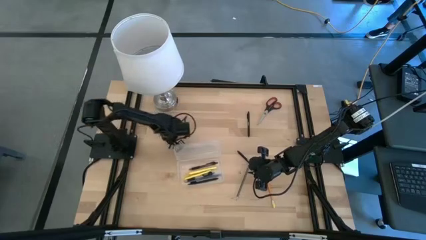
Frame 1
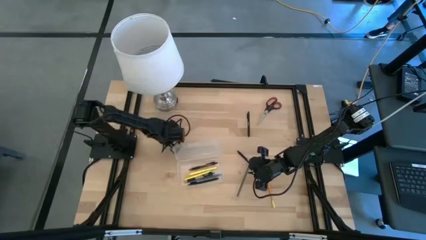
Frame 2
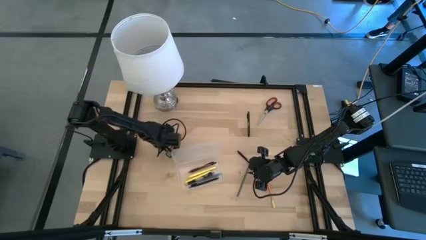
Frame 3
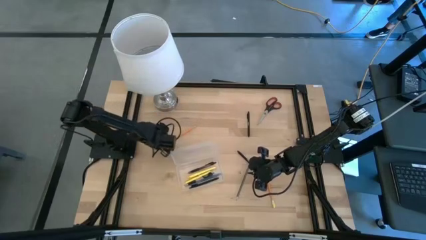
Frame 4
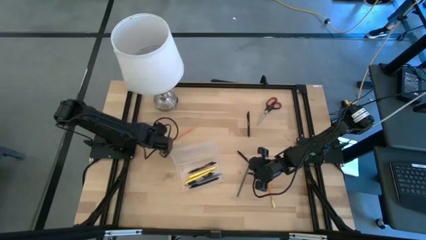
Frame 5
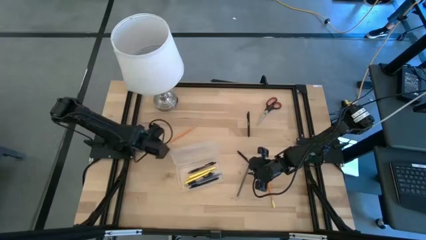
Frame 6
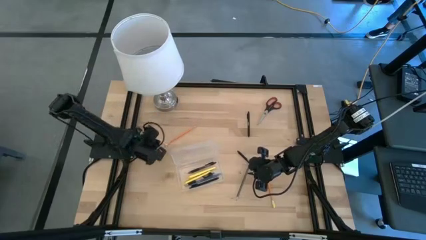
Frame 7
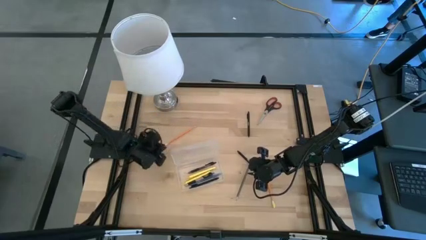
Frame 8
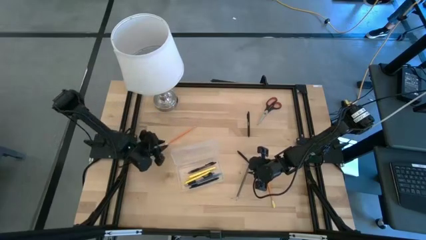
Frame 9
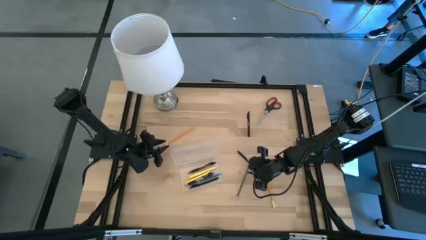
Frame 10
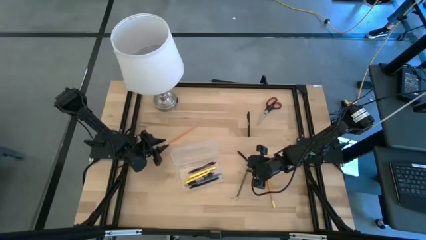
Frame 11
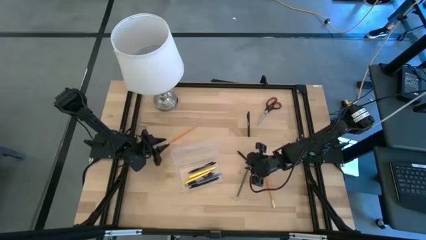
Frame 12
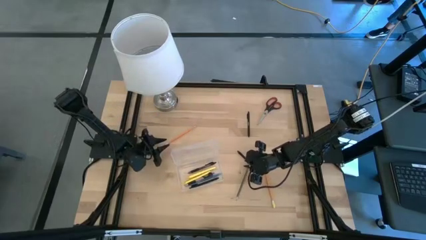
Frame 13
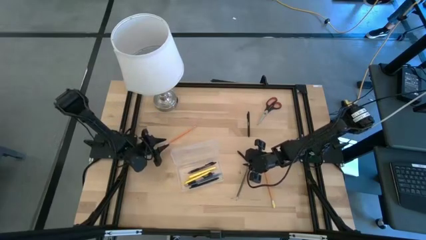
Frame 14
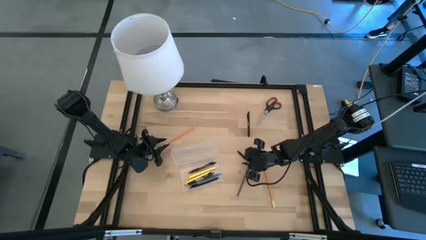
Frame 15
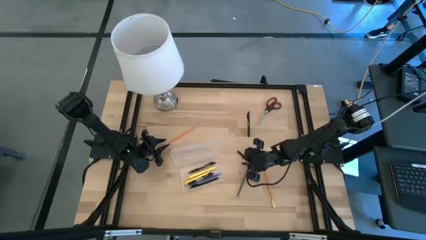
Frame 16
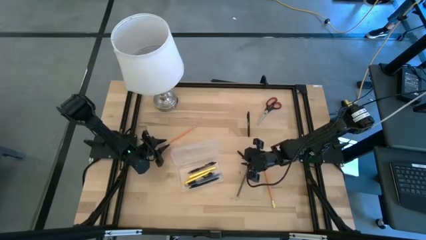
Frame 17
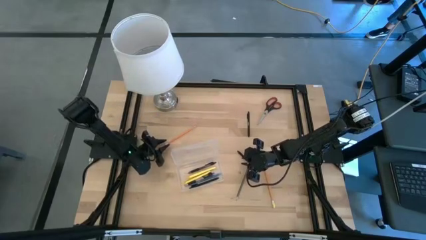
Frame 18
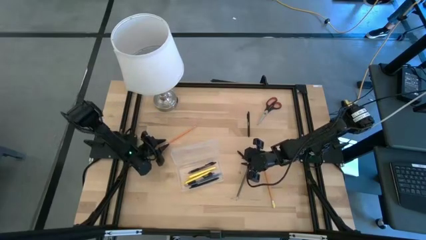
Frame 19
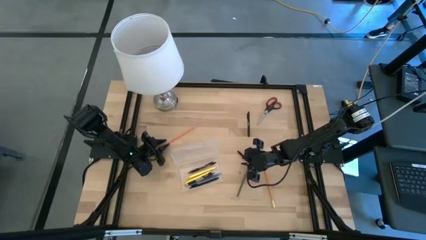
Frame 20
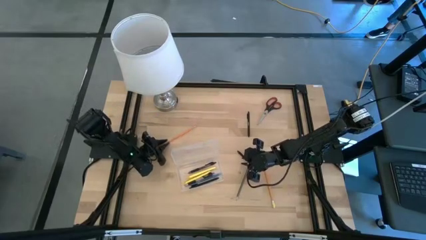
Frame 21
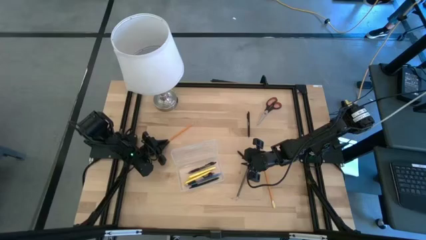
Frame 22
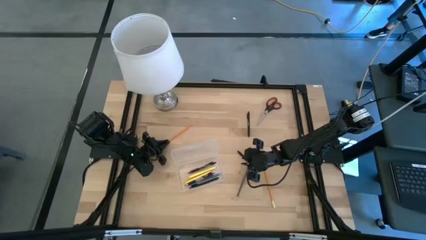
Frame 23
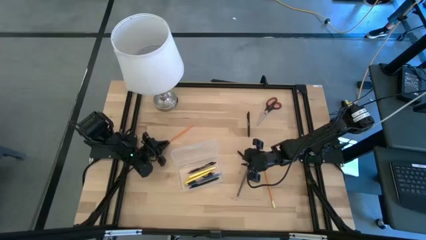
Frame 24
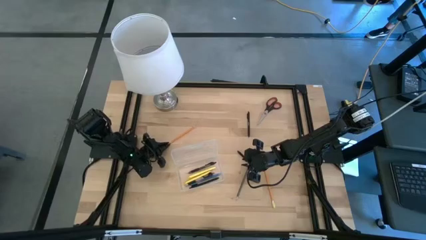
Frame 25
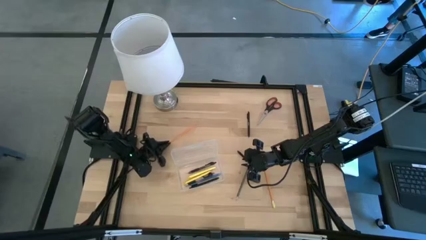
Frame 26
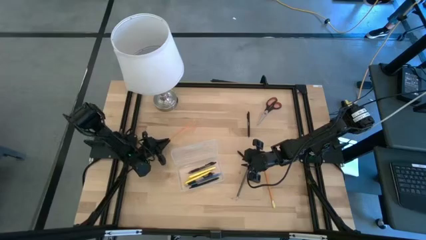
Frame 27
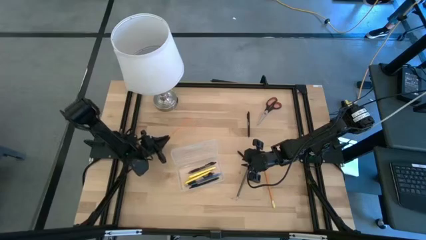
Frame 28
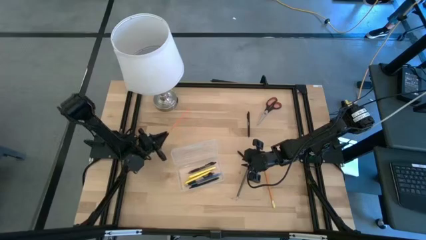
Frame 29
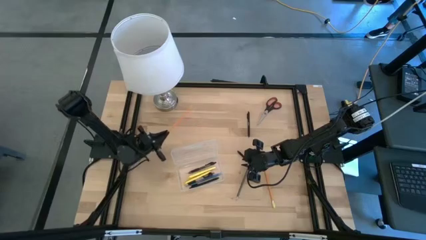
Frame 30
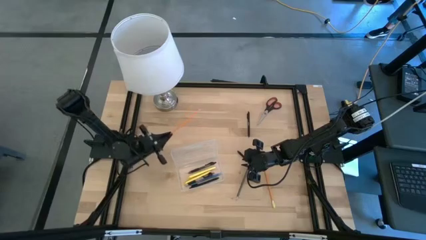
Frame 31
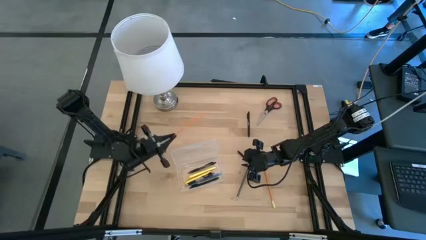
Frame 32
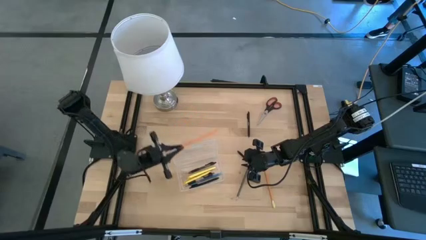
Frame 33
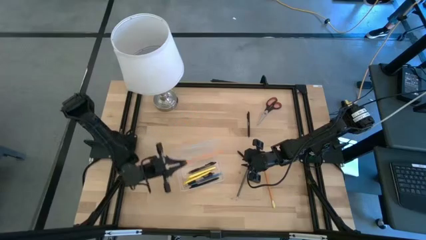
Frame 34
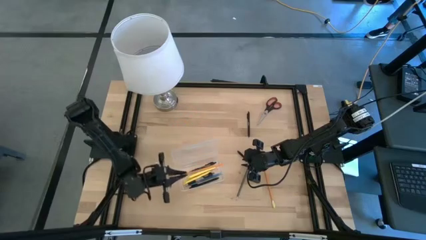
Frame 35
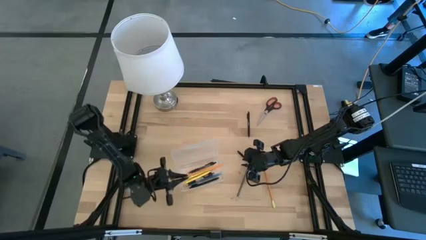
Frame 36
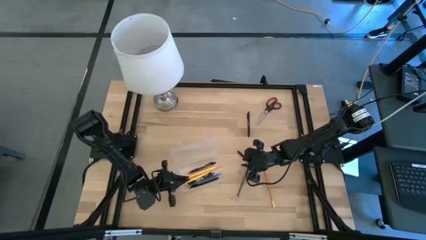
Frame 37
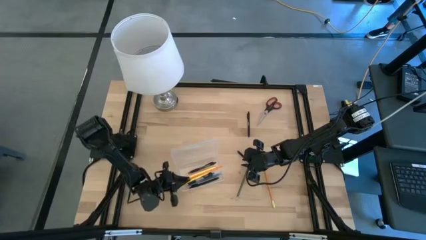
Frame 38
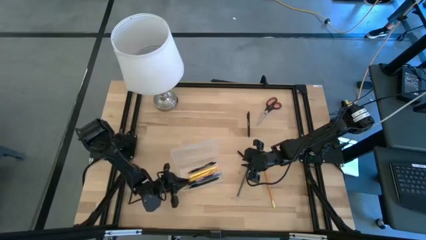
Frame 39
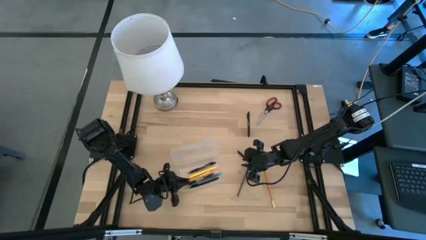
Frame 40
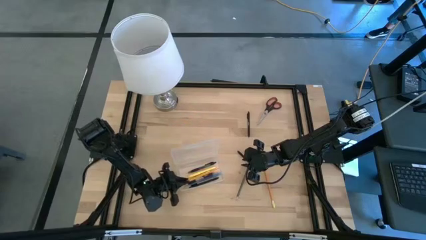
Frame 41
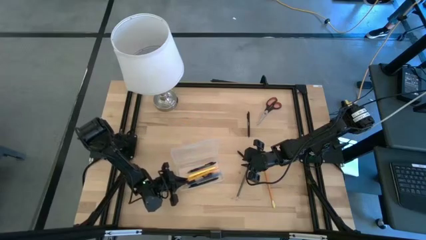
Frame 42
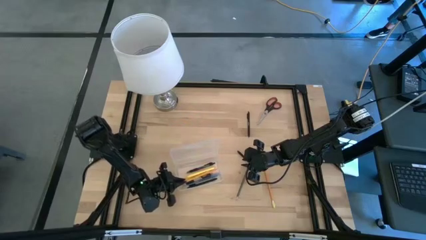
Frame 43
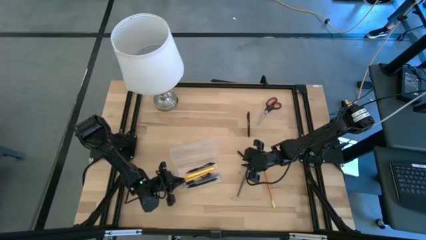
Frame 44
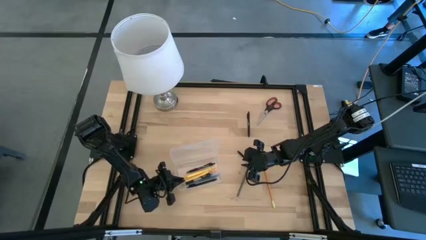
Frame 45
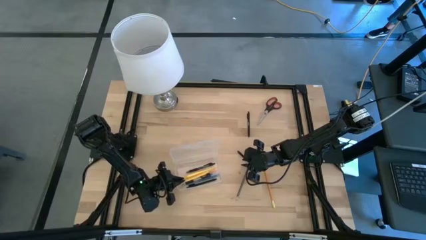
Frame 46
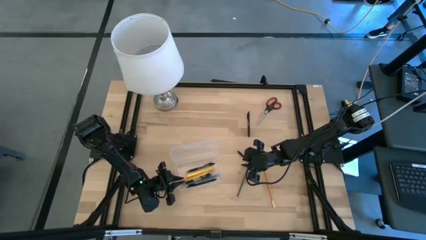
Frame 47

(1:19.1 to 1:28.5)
Task: Pick & place school supplies into a supply box
Put the top orange pencil into the transparent supply box

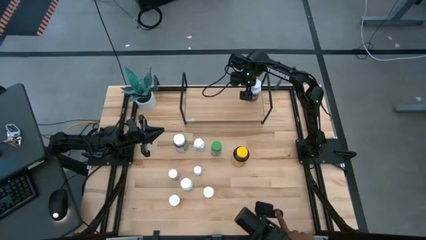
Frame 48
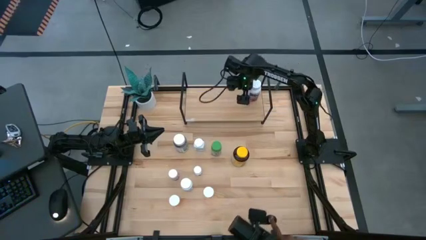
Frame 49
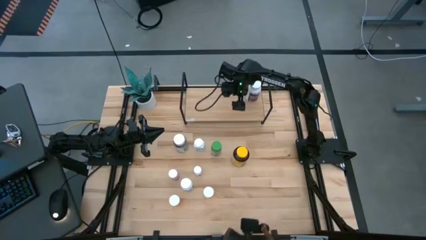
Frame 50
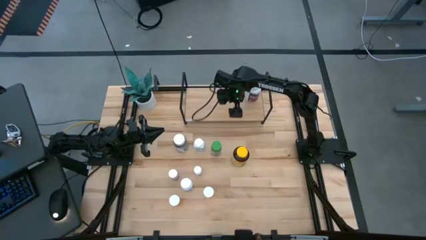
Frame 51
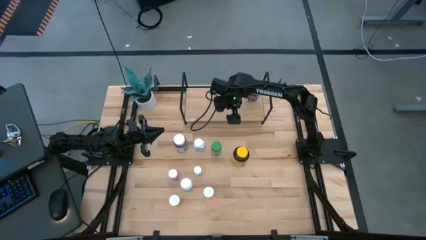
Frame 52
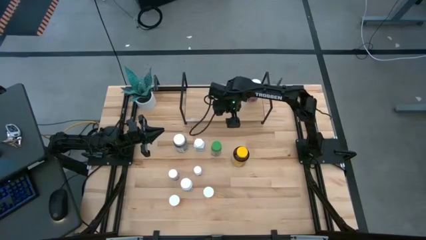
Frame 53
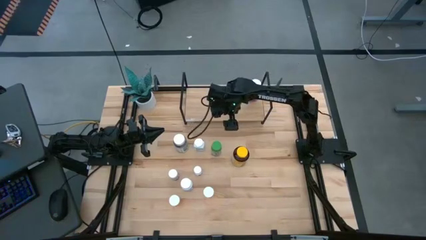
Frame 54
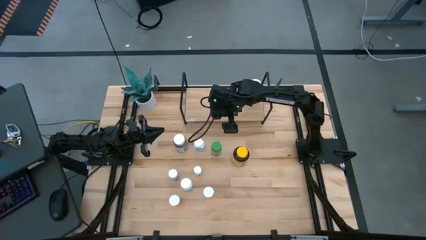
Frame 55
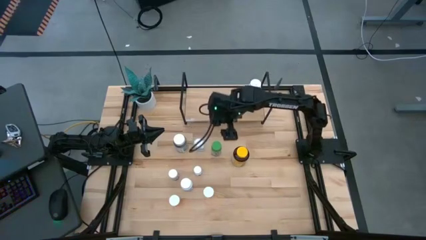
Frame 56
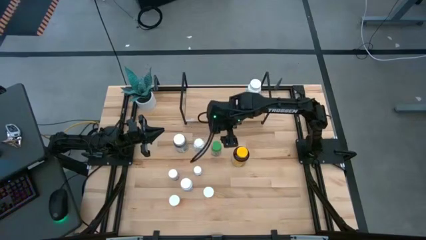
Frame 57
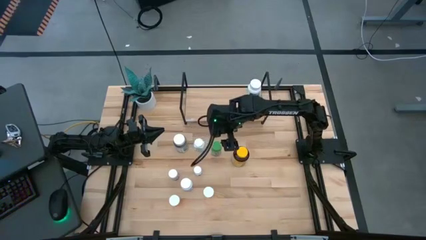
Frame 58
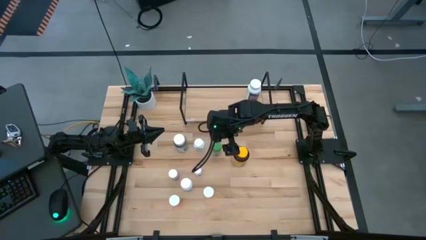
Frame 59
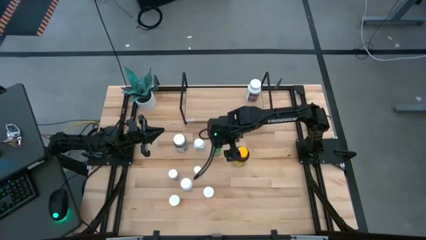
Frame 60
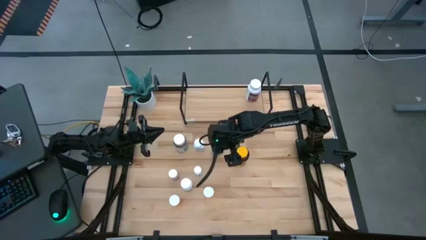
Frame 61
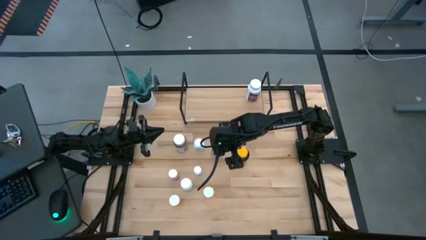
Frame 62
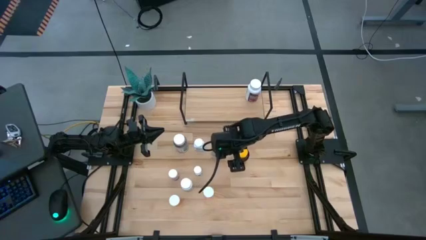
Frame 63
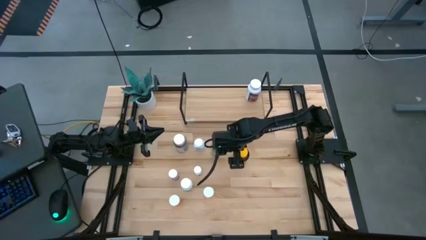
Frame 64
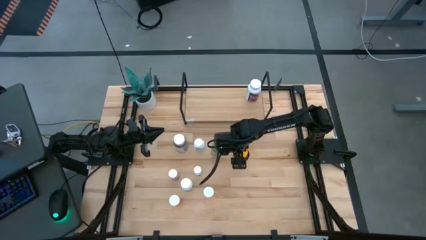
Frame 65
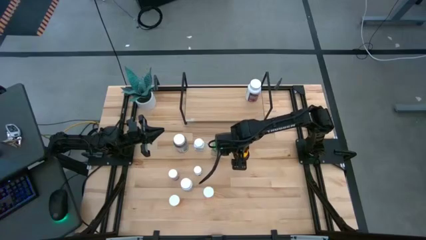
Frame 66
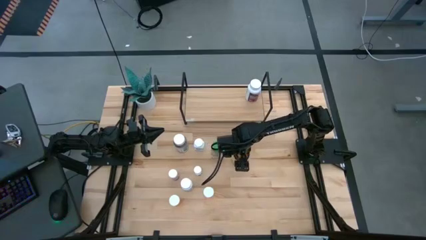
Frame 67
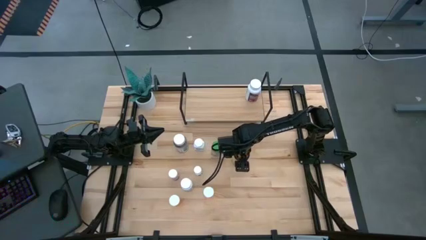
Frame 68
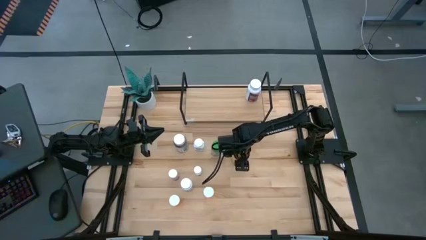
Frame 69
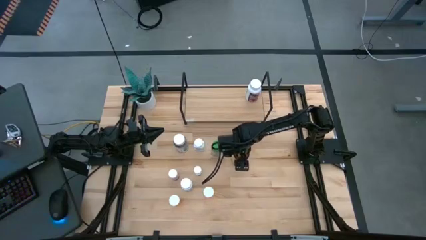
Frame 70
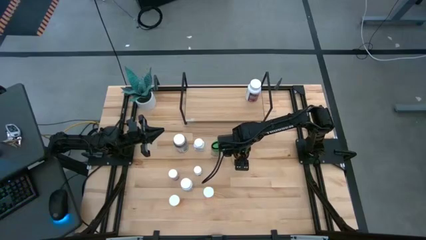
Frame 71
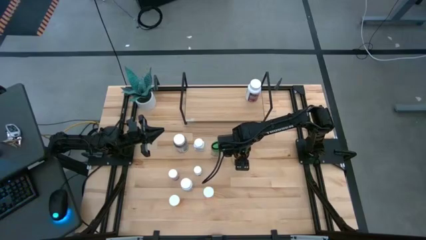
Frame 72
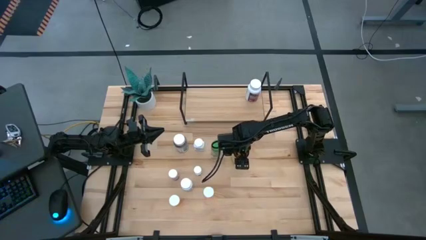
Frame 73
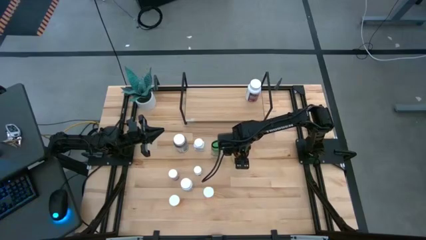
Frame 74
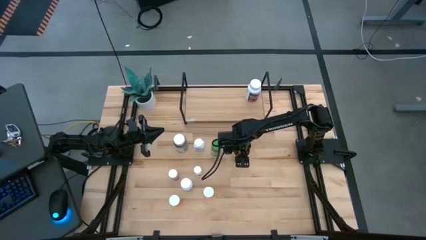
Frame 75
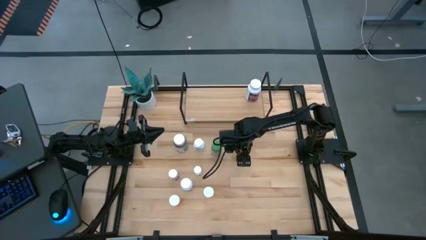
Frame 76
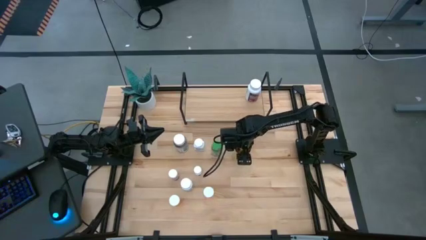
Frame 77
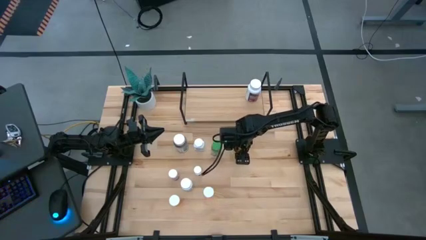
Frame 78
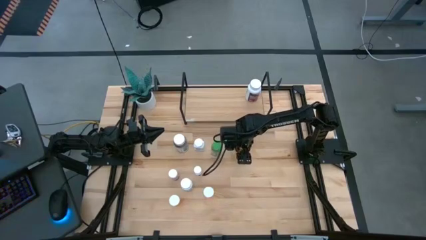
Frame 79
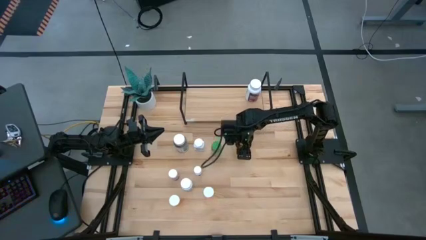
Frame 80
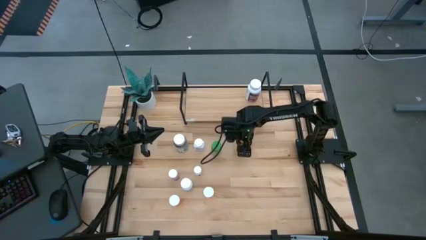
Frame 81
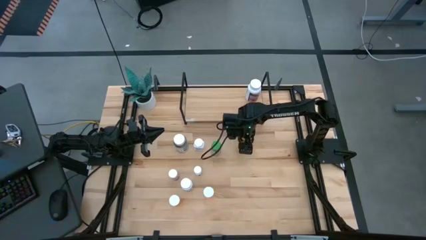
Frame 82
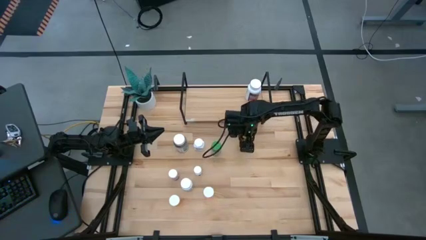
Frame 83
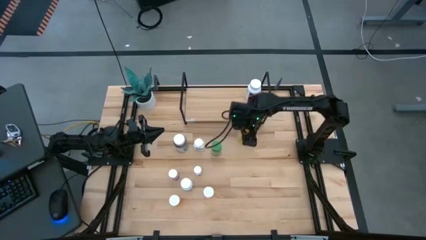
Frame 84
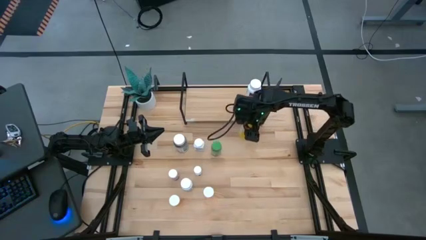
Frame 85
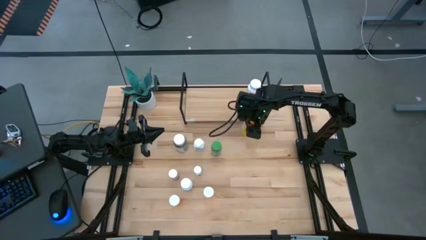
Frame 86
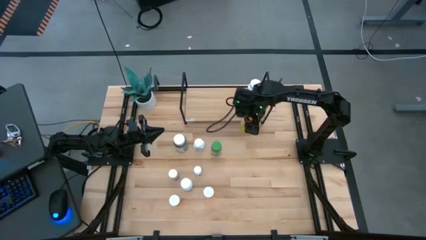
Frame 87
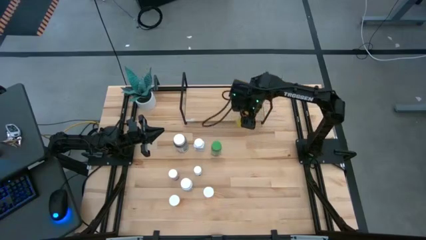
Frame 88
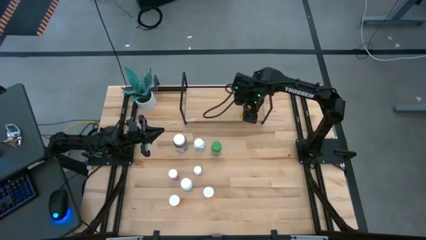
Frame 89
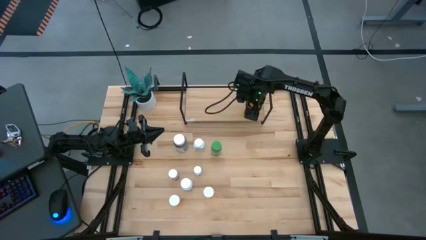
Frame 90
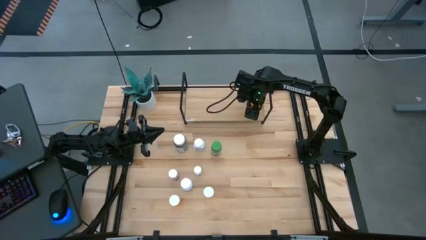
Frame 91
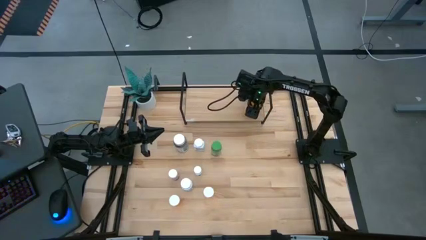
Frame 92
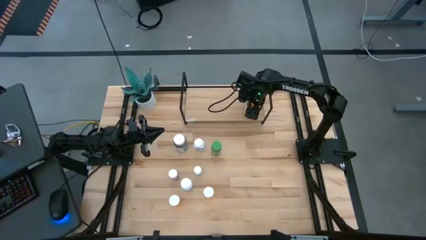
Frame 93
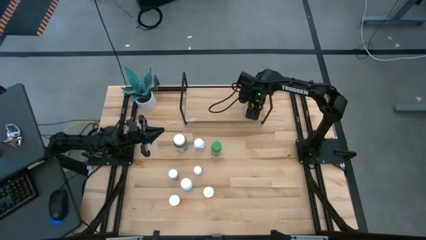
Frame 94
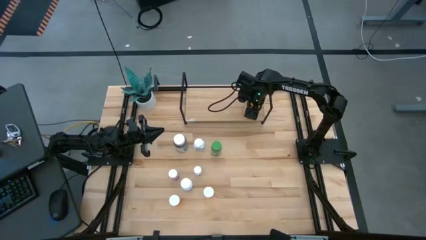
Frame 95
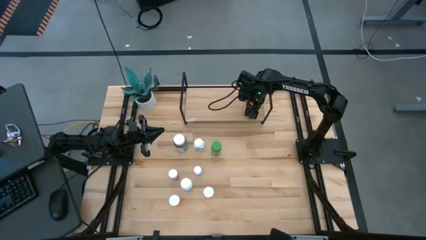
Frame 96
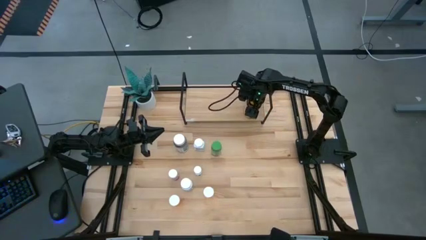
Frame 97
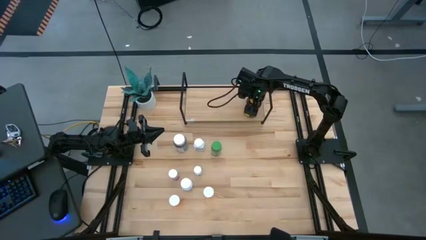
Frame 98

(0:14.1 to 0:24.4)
Task: Pick and place medicine bottles onto shelf by color
Put the yellow medicine bottle on the shelf
